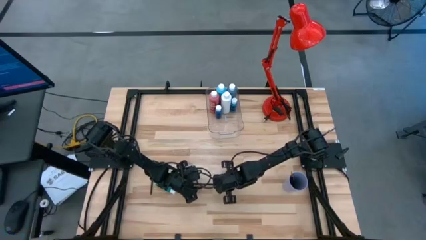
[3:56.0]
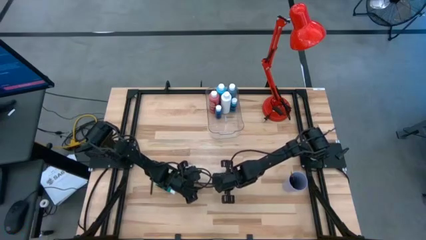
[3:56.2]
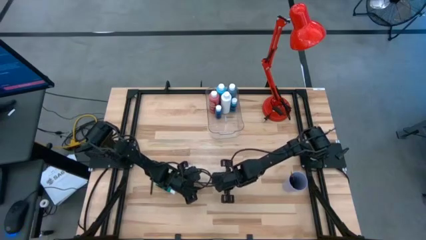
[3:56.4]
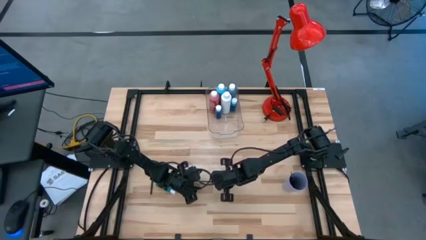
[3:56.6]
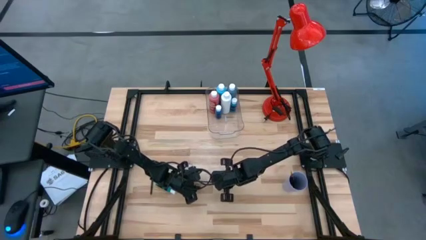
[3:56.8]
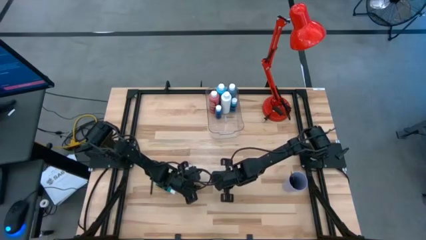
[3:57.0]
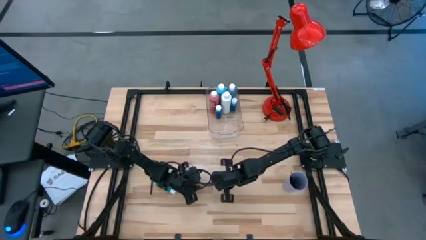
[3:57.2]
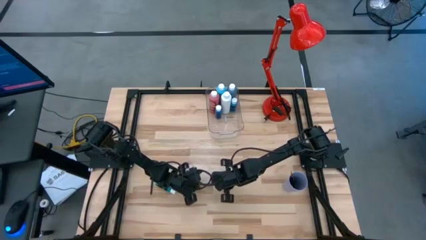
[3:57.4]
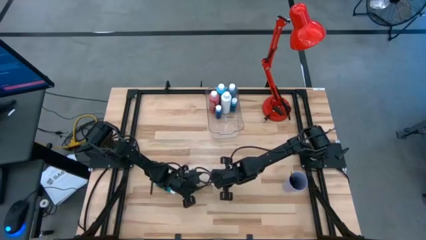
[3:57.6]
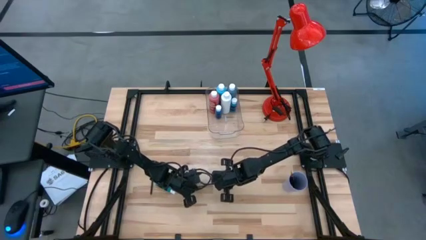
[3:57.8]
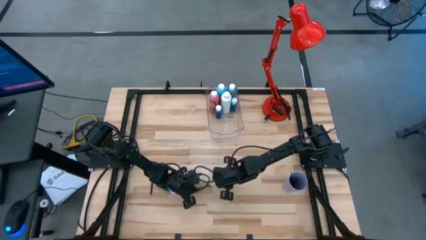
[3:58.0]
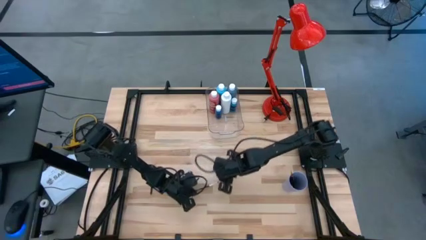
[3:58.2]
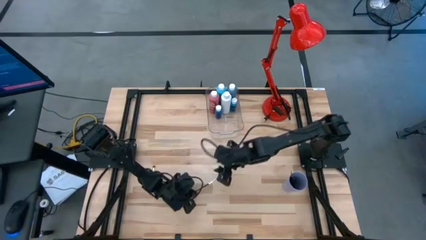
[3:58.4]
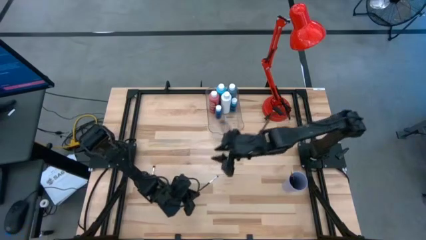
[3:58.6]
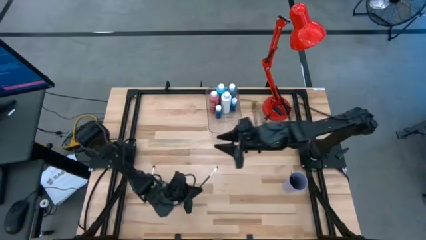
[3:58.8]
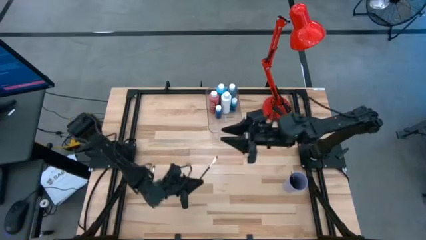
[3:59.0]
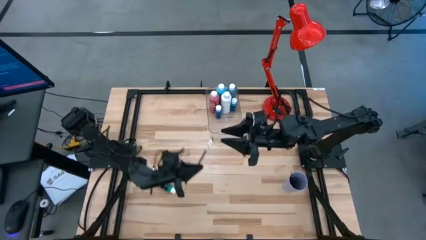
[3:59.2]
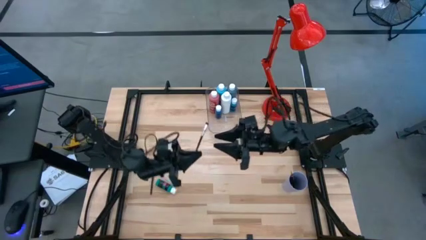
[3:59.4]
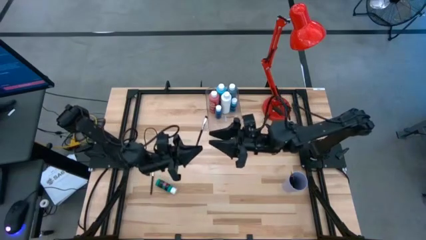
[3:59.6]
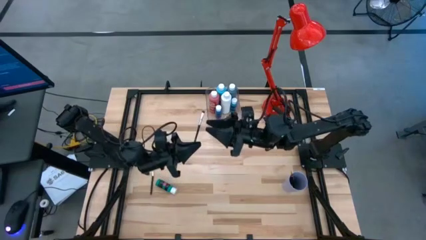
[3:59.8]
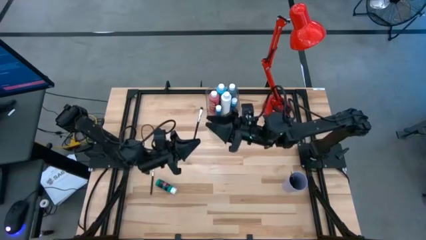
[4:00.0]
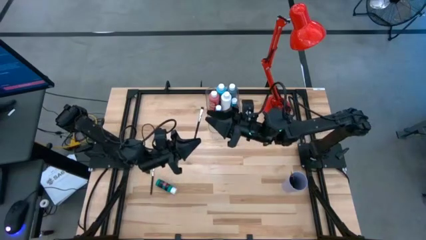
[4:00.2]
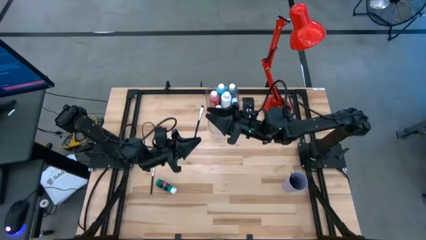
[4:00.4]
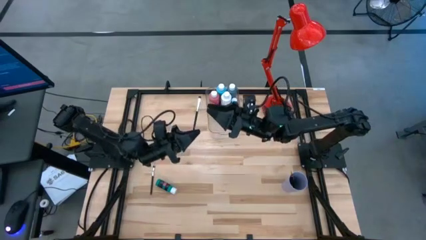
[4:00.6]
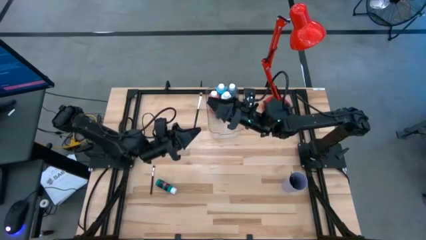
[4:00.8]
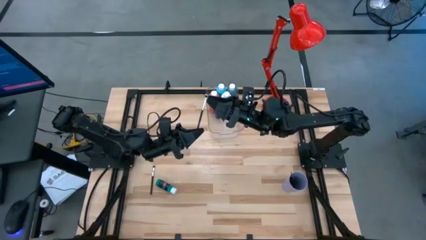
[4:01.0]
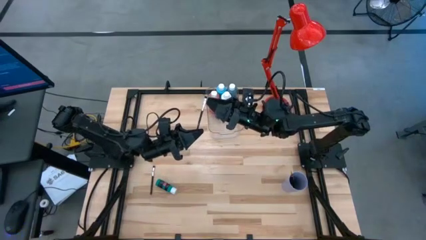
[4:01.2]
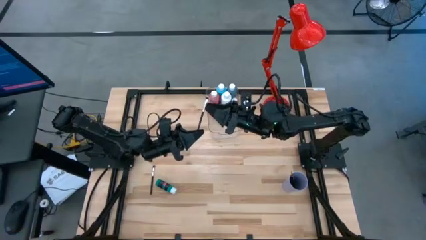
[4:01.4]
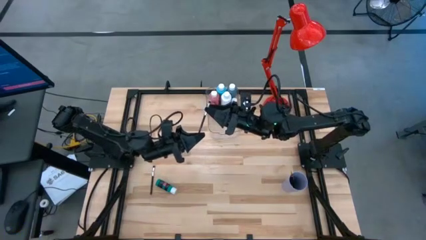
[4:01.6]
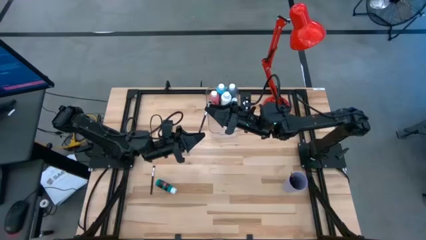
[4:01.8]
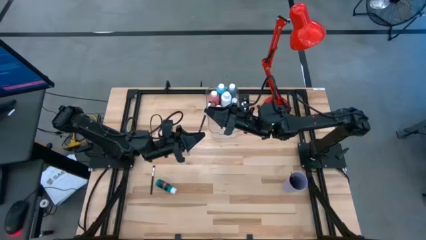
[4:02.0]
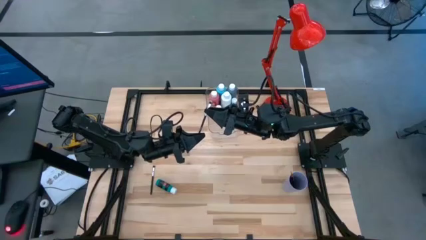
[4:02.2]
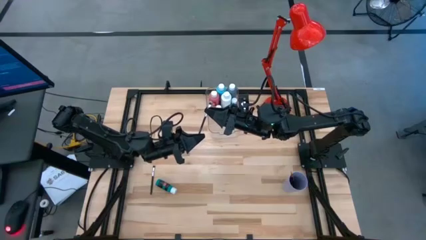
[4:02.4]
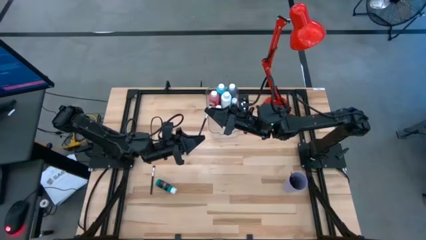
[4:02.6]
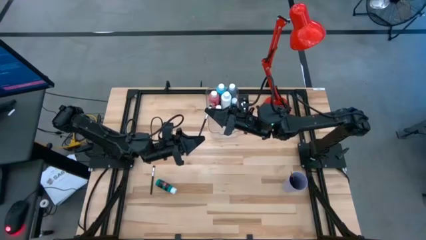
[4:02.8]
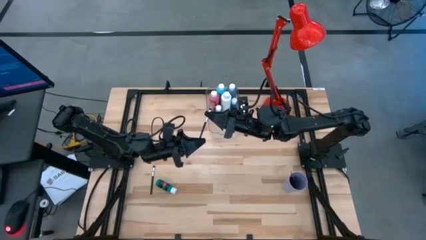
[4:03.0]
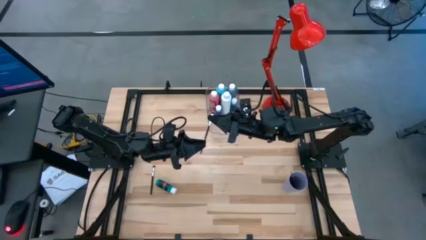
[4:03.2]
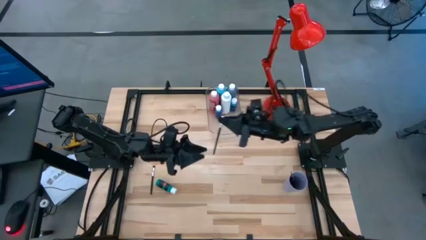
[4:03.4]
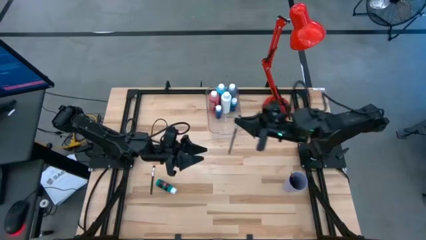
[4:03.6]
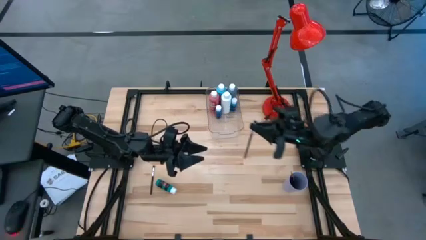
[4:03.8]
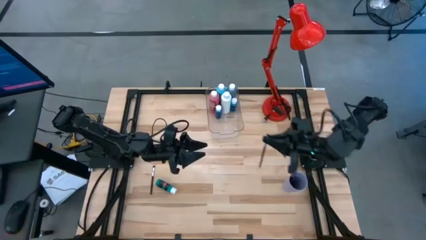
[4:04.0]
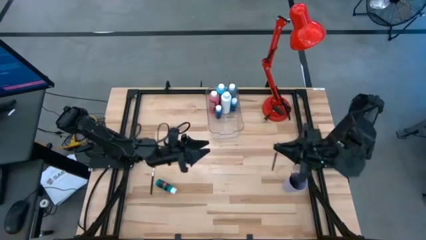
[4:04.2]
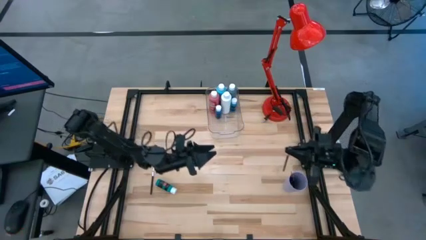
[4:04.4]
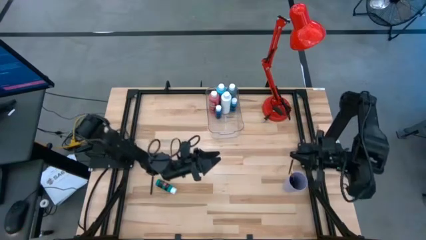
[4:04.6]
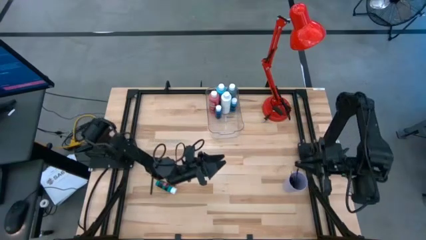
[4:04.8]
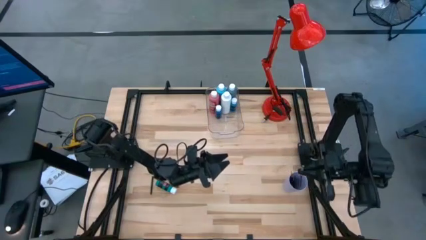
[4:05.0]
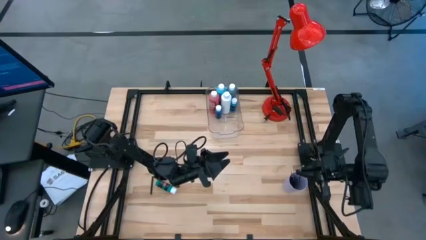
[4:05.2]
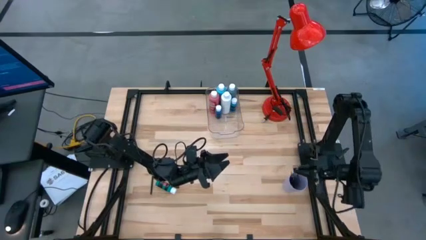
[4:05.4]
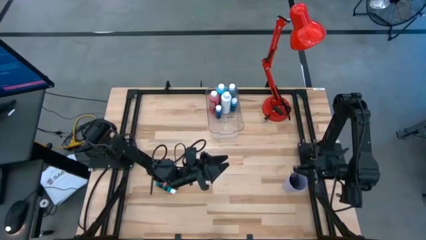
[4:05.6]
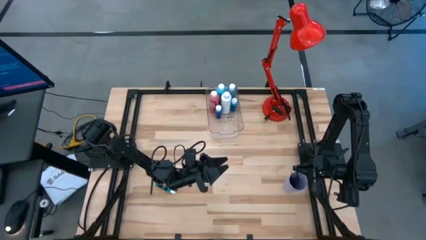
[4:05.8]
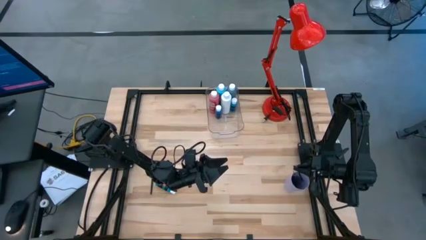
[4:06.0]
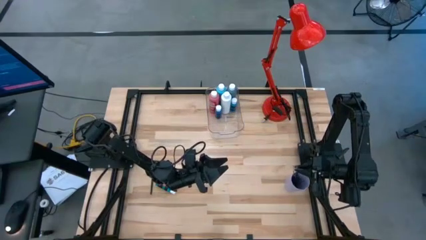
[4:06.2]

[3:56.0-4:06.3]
Task: Pick & Place Paint Supplies
Put the silver paintbrush into the purple cup

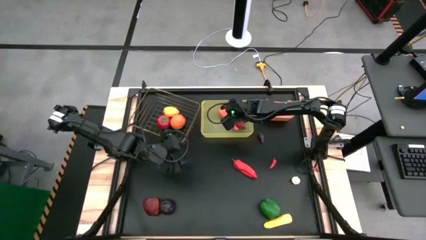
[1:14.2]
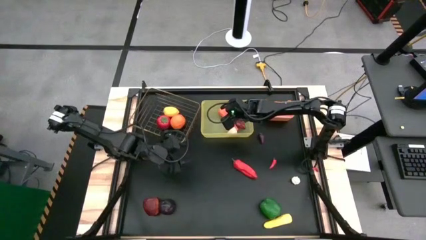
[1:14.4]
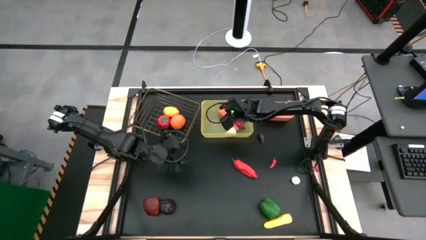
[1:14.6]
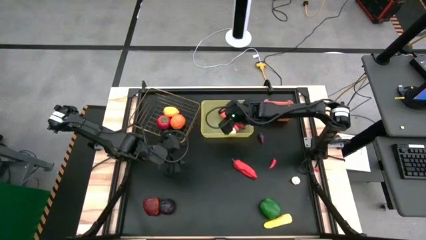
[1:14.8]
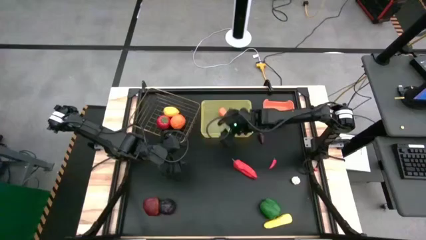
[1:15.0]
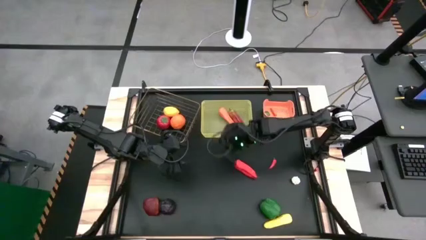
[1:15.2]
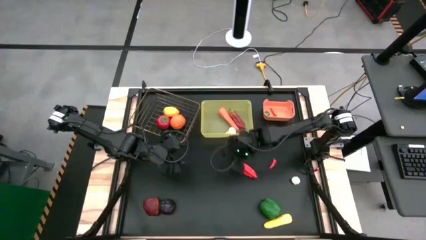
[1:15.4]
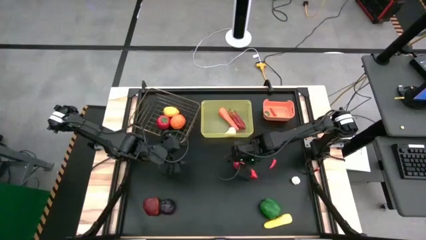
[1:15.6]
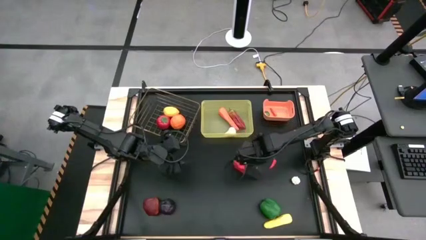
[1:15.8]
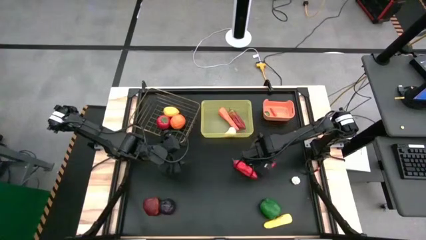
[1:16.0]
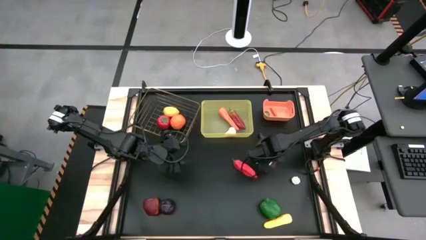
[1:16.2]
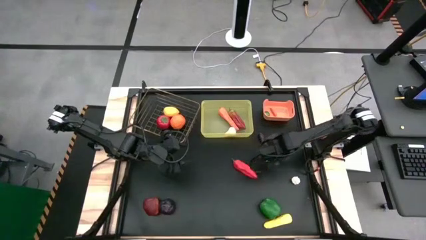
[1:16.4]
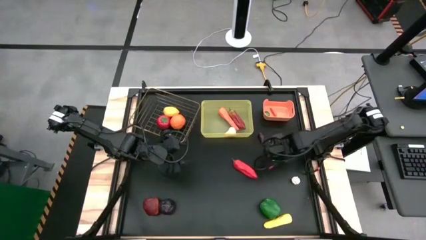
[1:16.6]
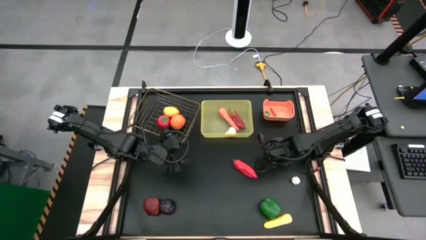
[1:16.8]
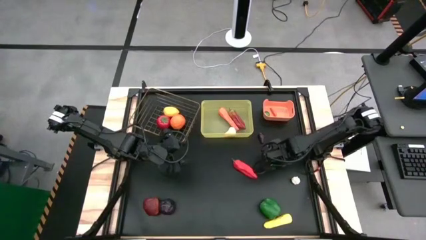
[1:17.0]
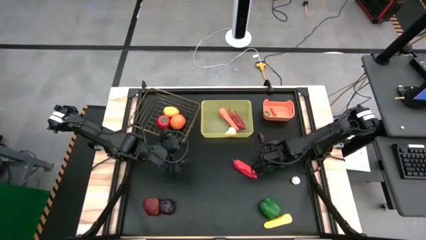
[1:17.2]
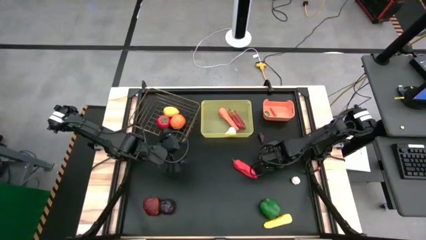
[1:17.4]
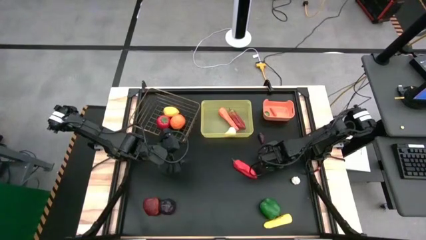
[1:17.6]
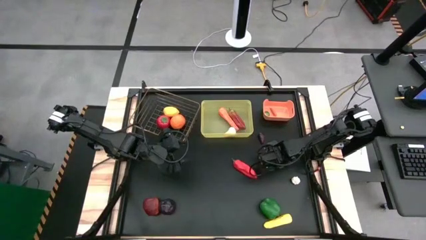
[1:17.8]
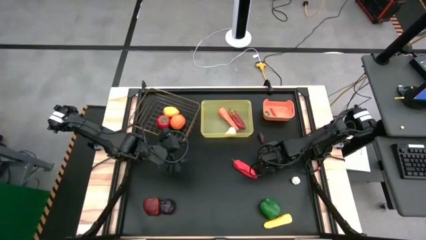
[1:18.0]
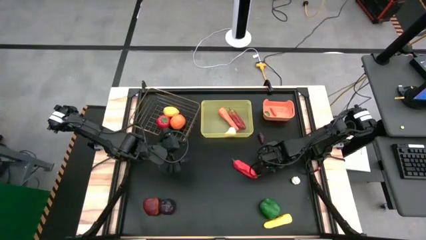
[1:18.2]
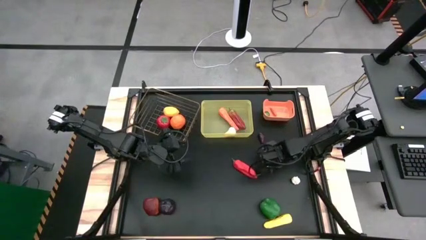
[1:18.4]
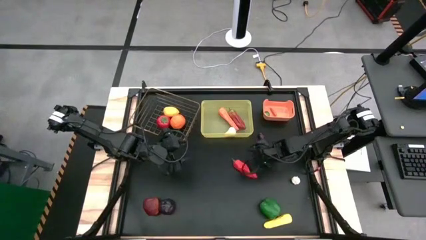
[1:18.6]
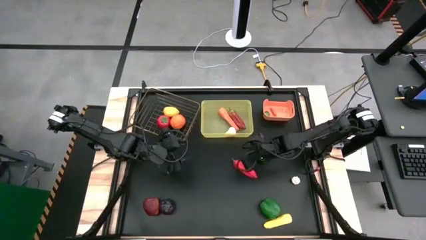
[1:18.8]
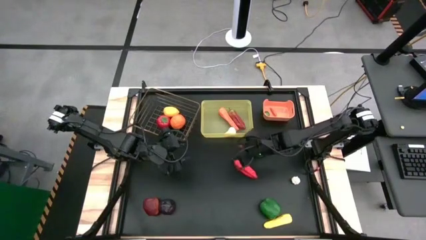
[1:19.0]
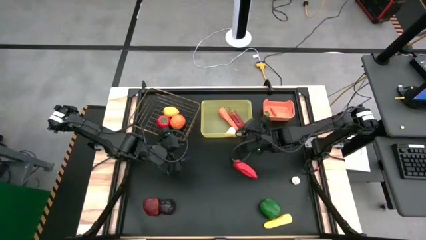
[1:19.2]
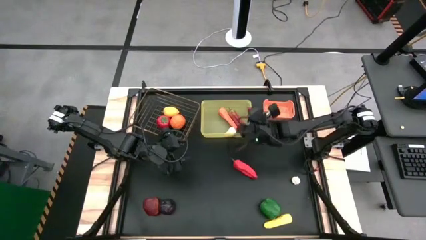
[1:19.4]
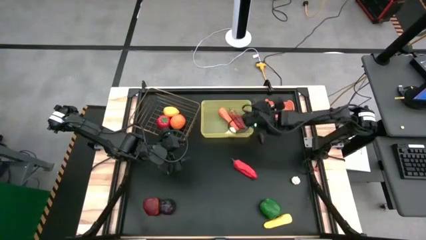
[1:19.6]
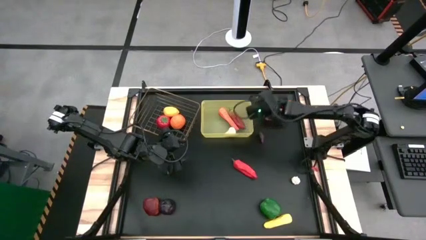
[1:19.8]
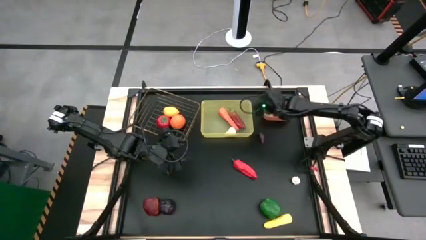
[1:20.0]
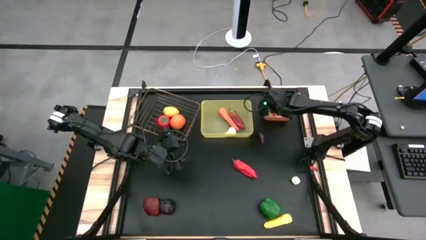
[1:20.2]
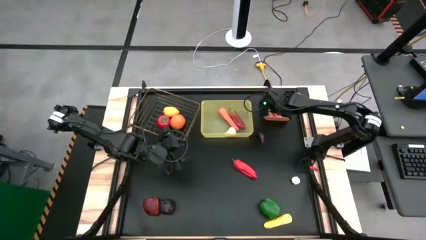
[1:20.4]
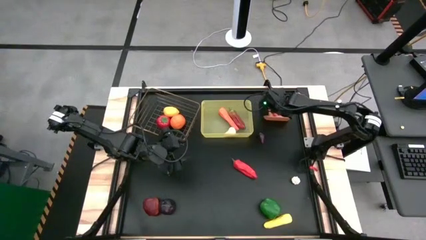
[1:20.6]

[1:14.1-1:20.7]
Task: Sort produce into baskets
Put the cayenne pepper into the orange bin
